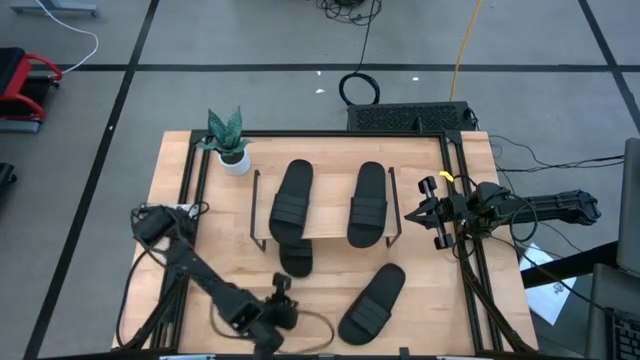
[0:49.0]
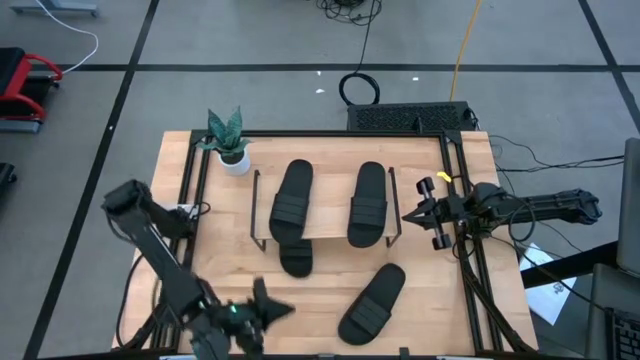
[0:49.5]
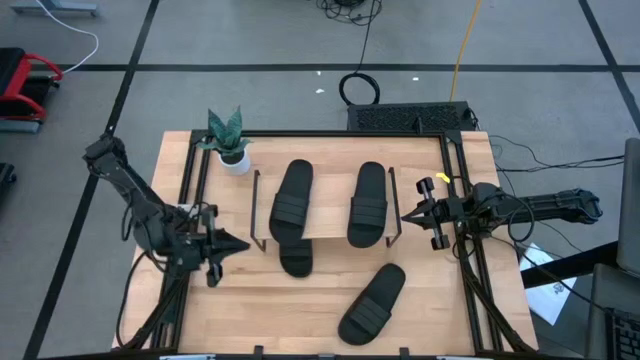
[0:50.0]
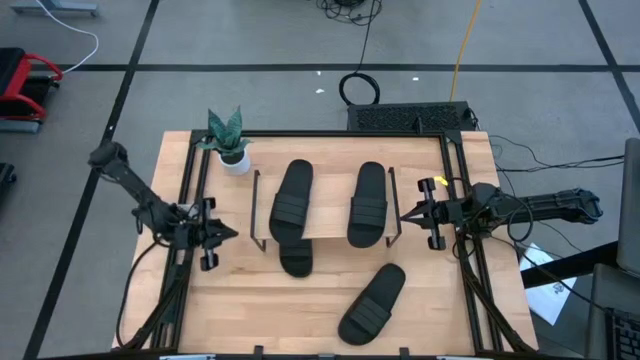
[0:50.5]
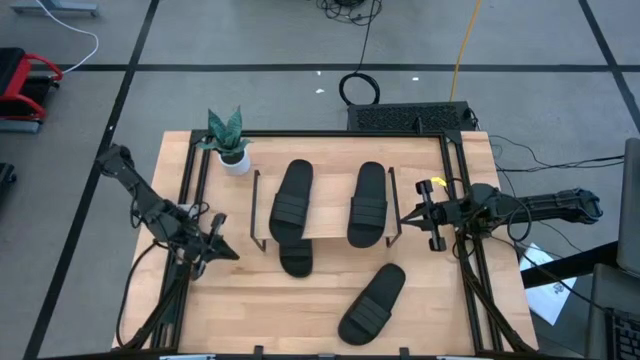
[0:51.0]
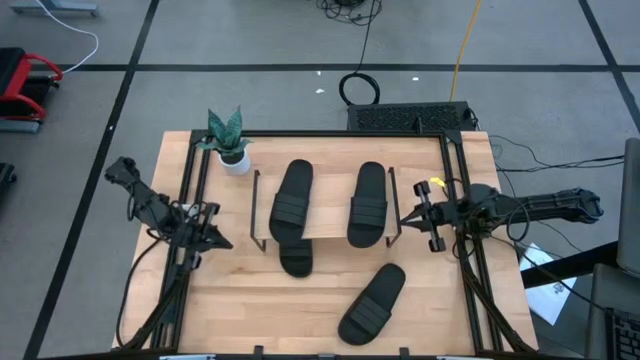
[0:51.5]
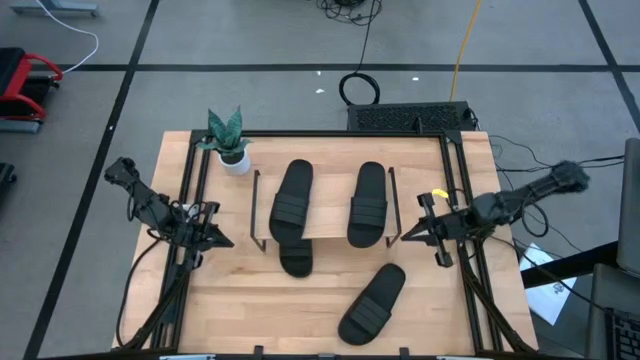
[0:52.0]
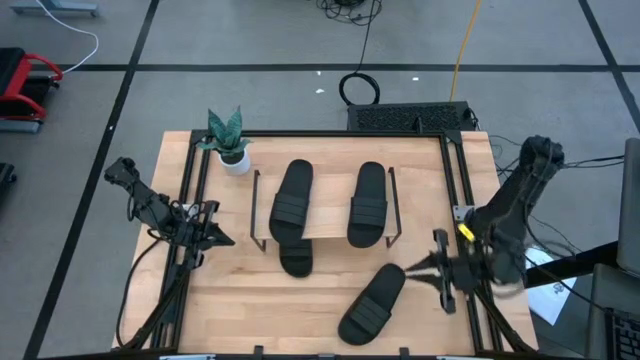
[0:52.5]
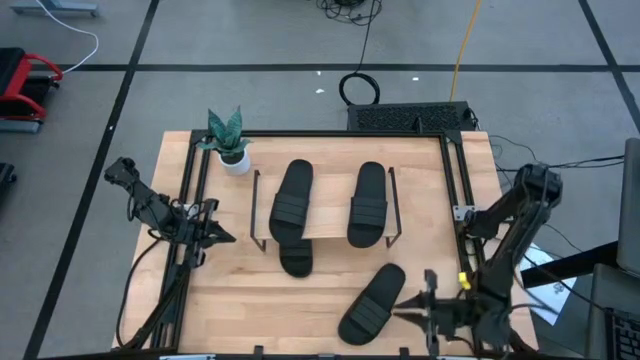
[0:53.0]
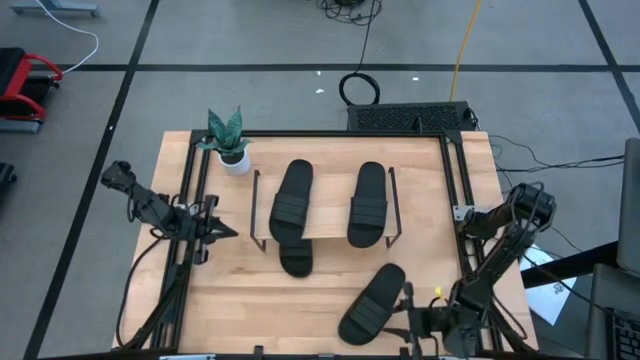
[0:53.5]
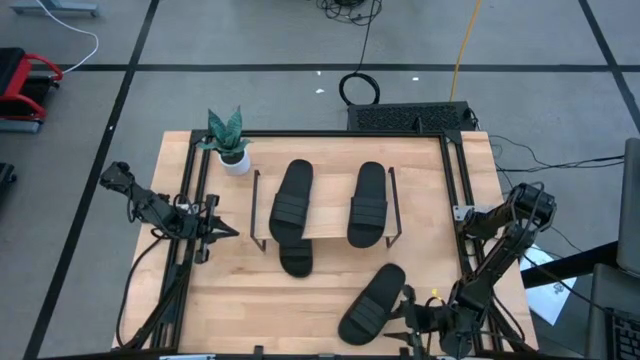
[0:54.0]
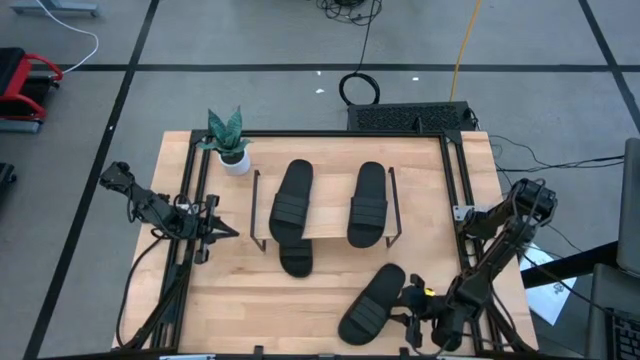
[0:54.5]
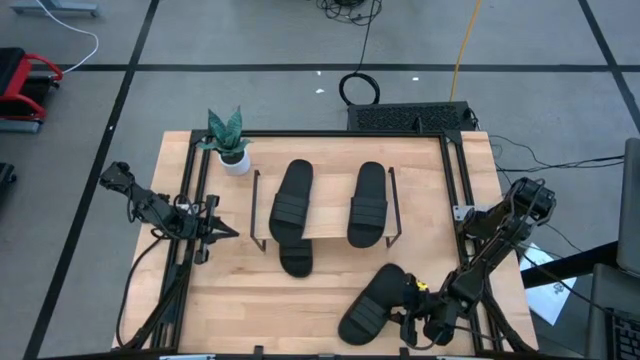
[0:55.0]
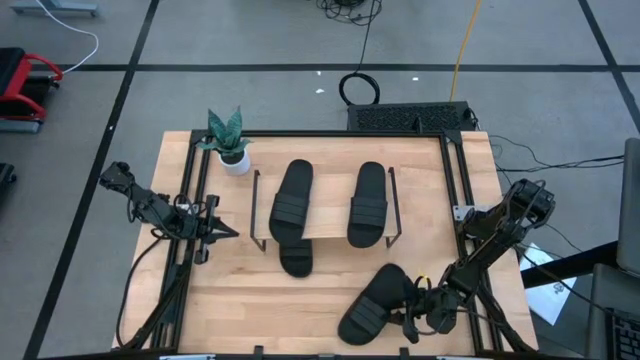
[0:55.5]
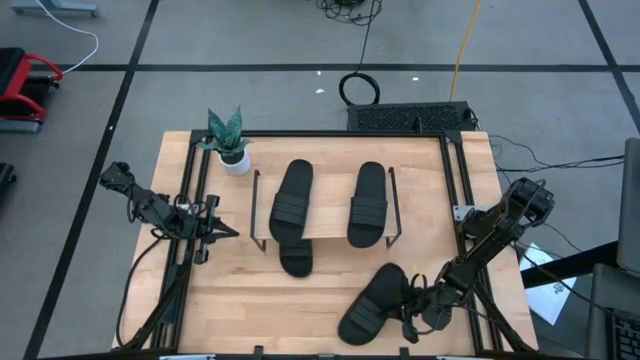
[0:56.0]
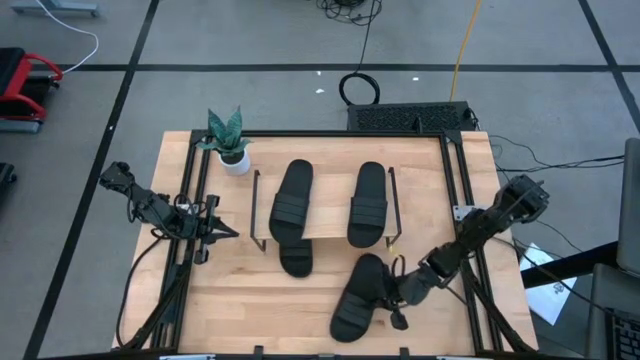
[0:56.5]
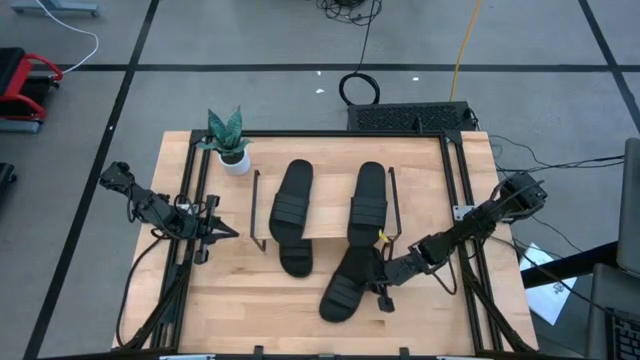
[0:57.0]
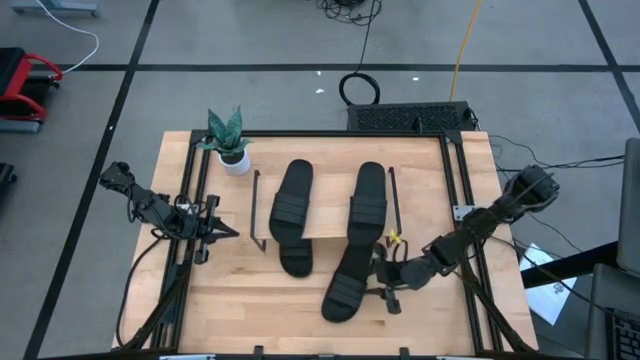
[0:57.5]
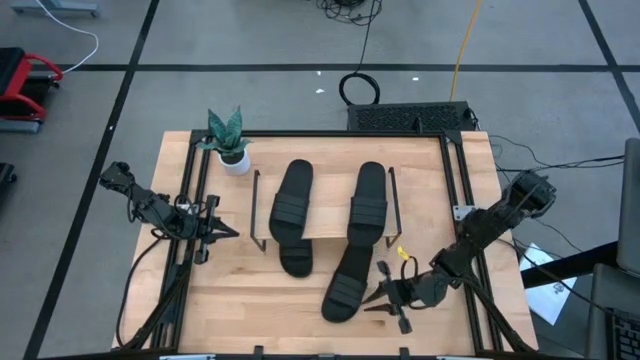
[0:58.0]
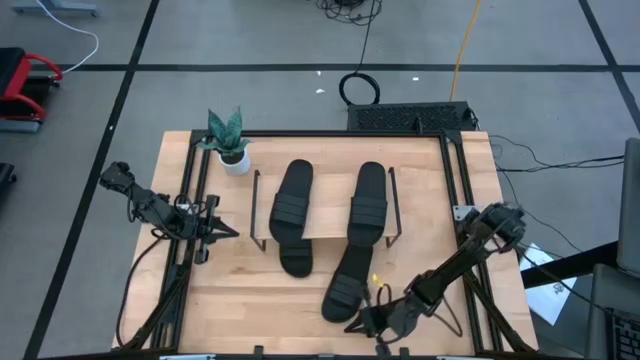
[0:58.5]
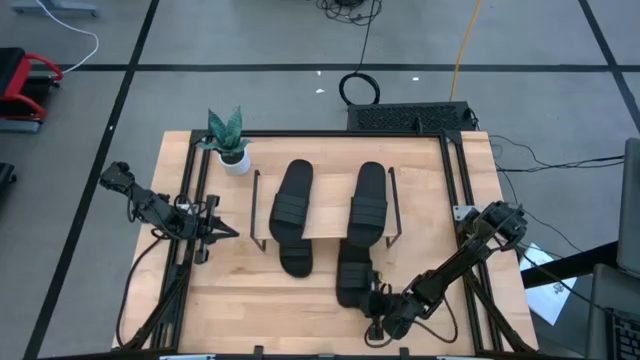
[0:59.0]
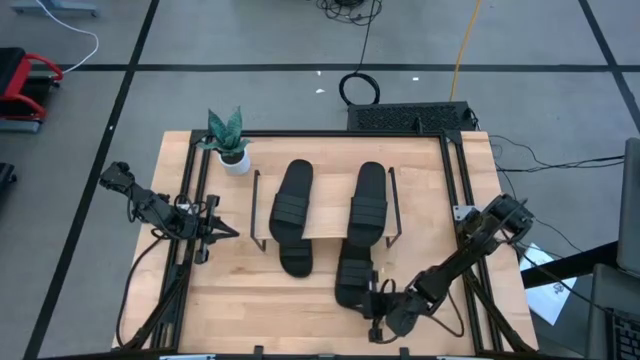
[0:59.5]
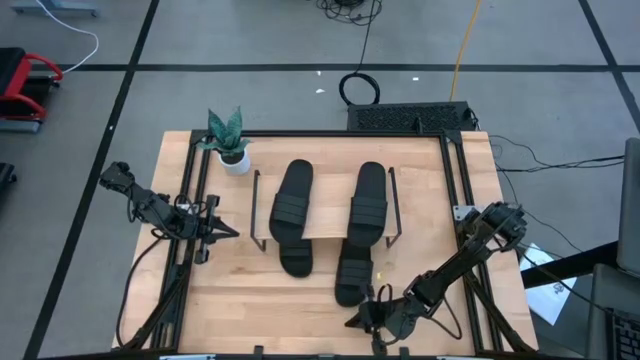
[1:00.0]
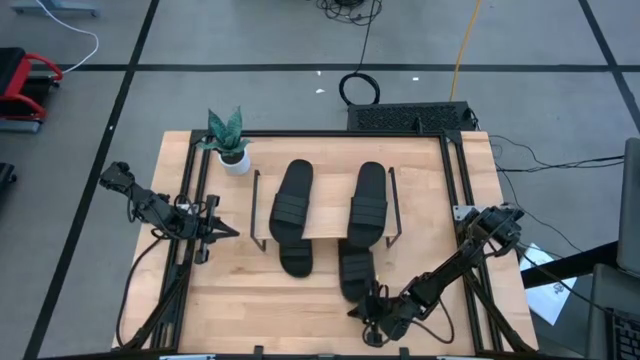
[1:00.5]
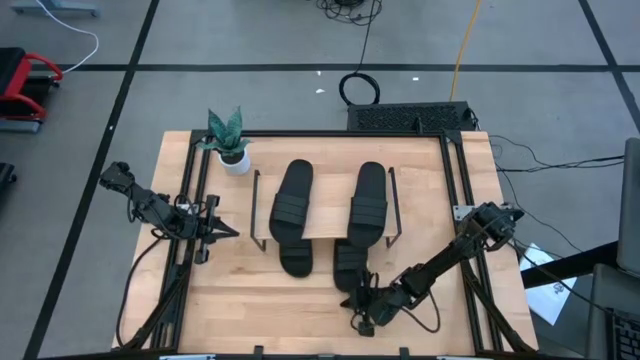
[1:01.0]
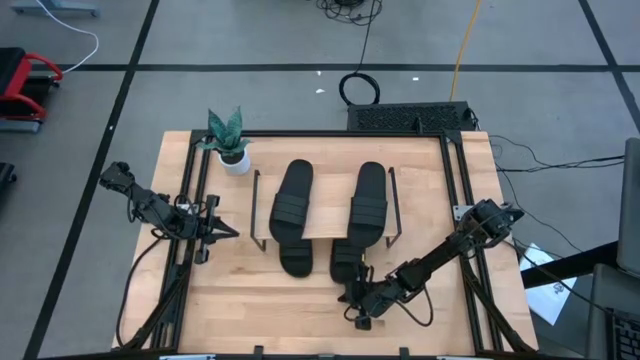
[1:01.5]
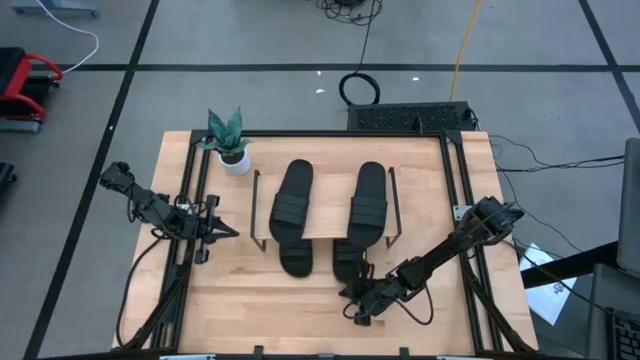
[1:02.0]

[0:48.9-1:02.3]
Task: Pick and place slides into the shelf
Put the black slipper under the shelf
